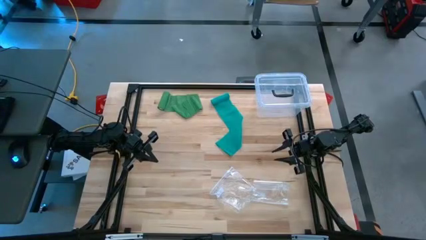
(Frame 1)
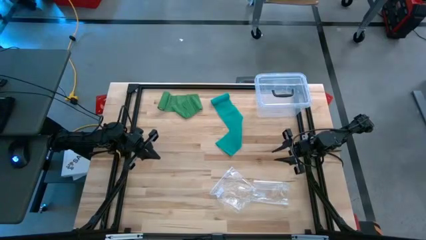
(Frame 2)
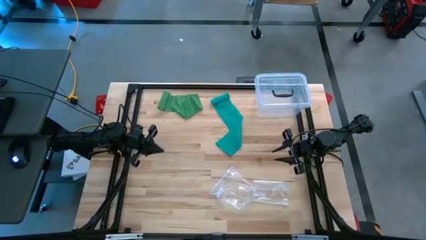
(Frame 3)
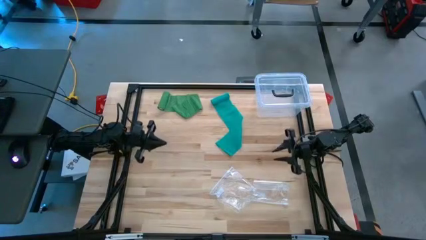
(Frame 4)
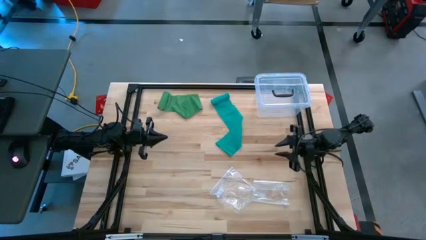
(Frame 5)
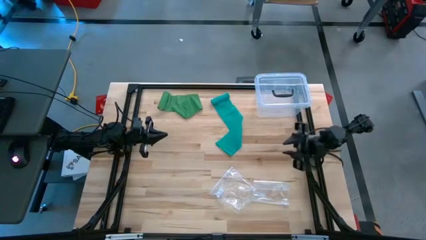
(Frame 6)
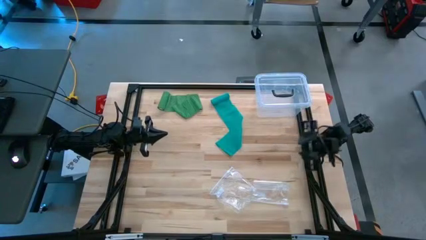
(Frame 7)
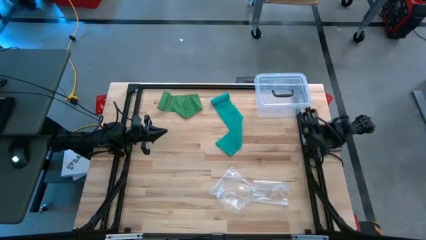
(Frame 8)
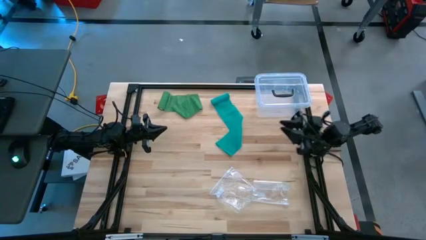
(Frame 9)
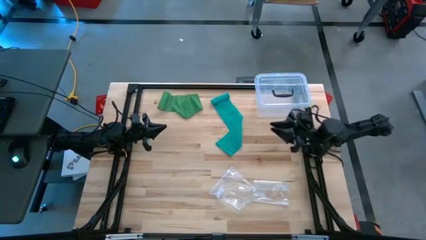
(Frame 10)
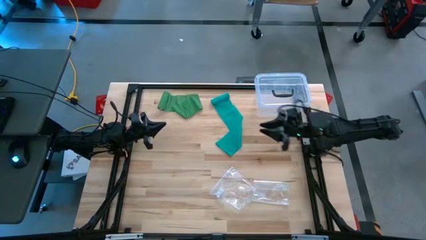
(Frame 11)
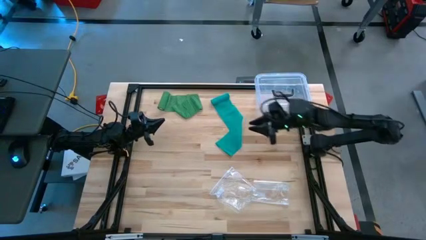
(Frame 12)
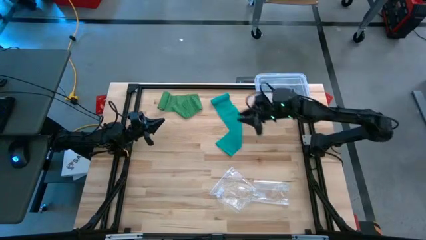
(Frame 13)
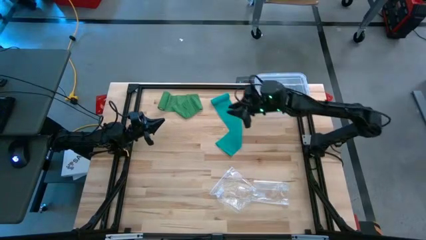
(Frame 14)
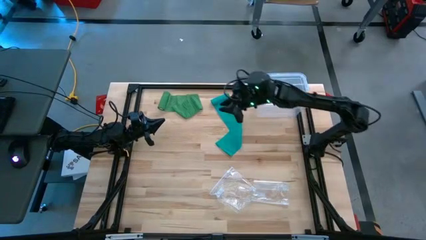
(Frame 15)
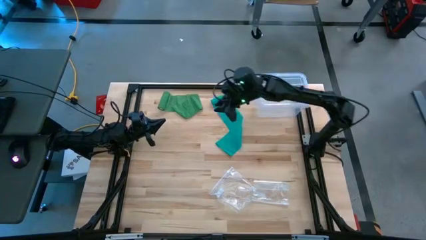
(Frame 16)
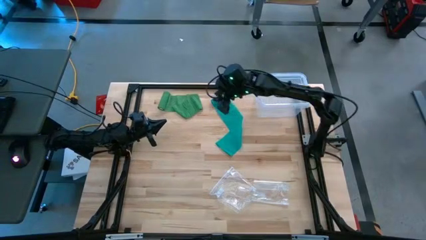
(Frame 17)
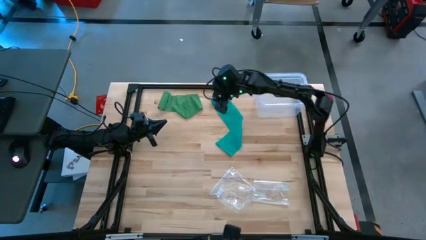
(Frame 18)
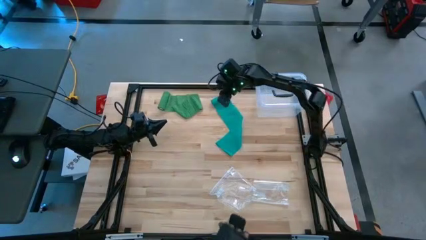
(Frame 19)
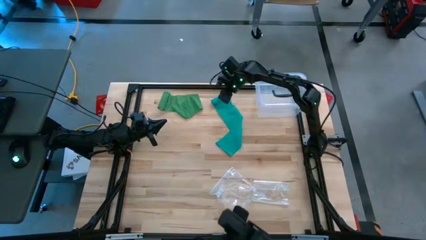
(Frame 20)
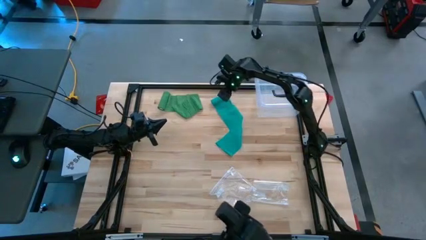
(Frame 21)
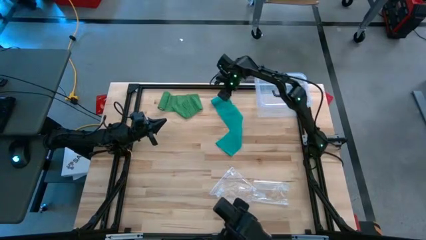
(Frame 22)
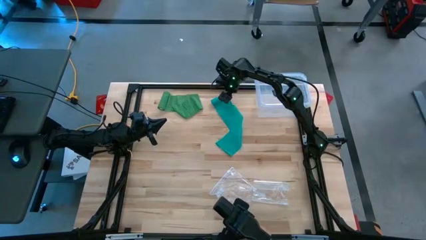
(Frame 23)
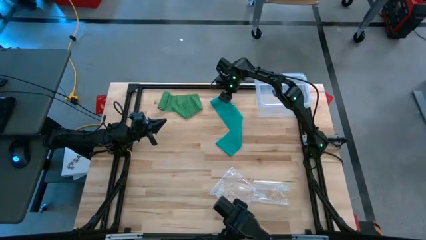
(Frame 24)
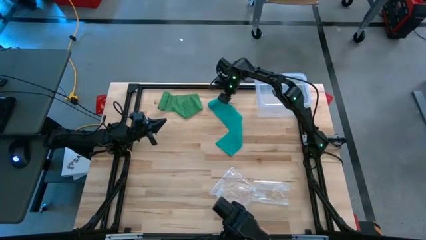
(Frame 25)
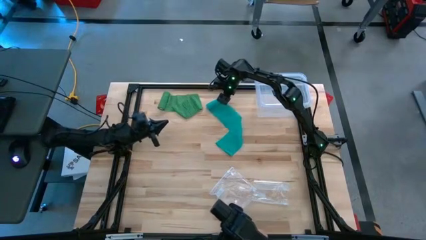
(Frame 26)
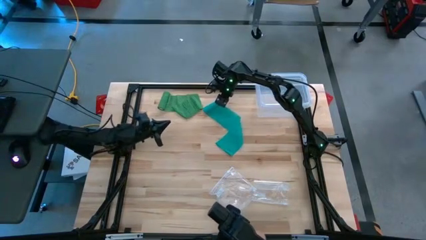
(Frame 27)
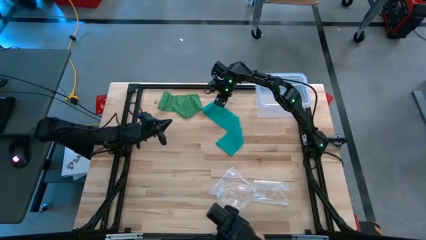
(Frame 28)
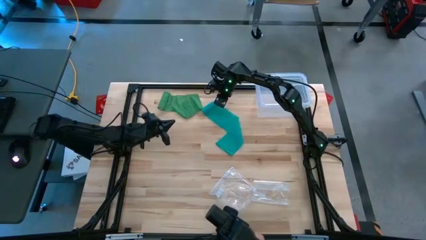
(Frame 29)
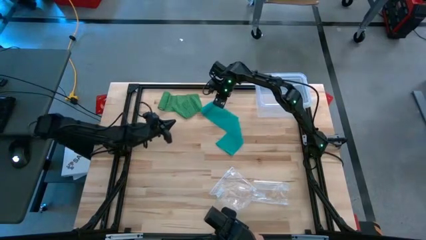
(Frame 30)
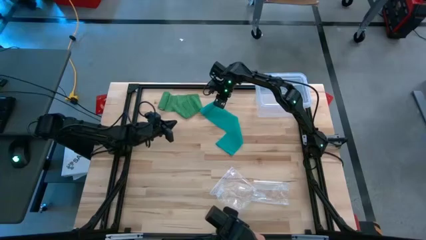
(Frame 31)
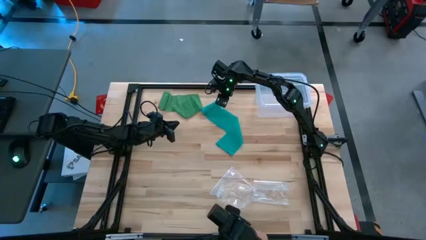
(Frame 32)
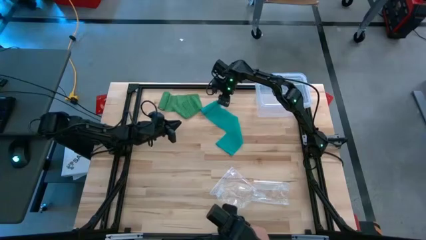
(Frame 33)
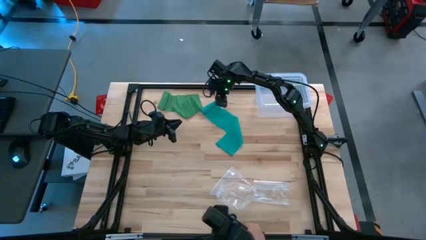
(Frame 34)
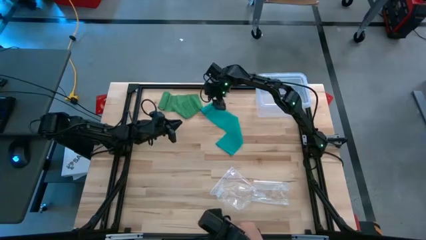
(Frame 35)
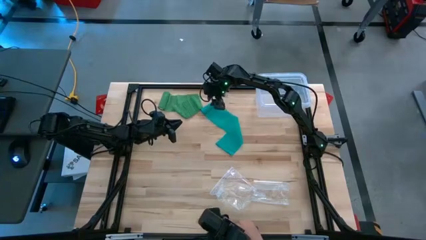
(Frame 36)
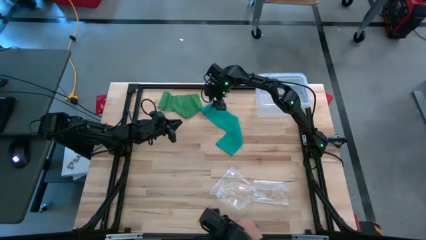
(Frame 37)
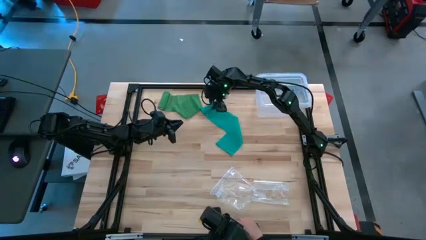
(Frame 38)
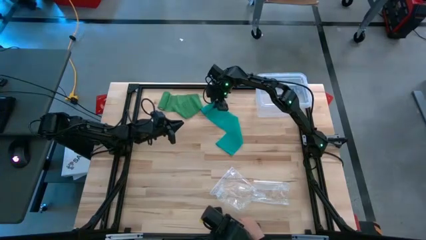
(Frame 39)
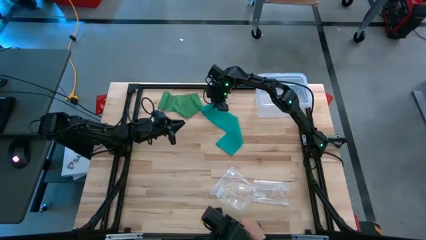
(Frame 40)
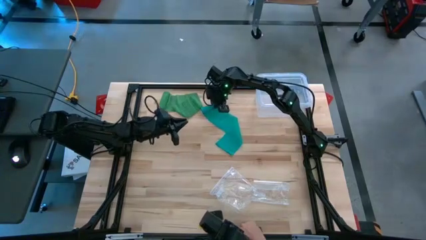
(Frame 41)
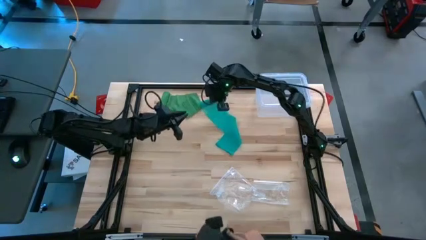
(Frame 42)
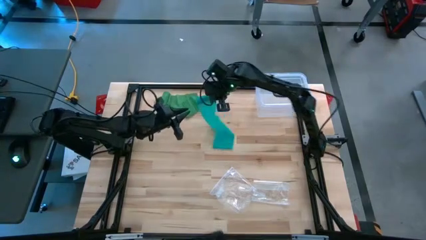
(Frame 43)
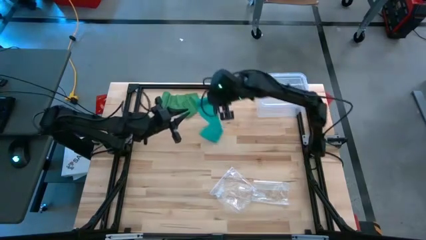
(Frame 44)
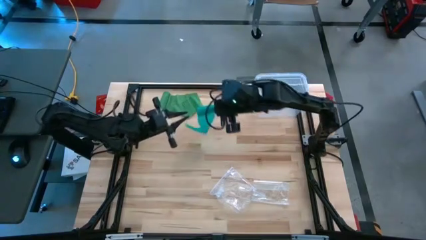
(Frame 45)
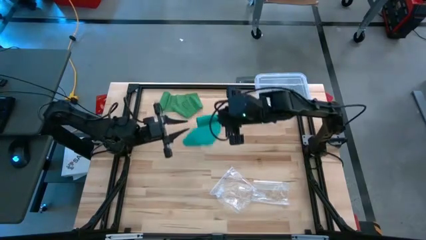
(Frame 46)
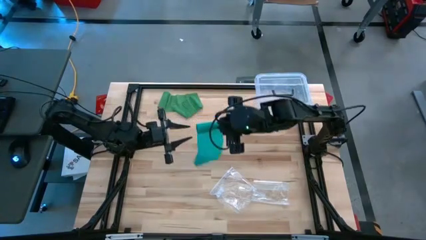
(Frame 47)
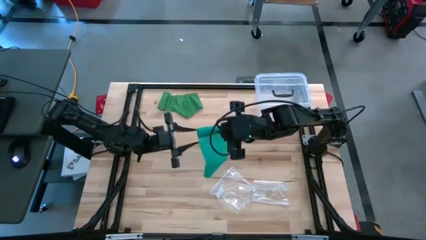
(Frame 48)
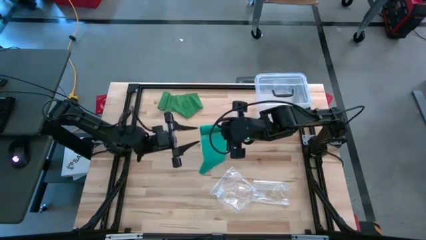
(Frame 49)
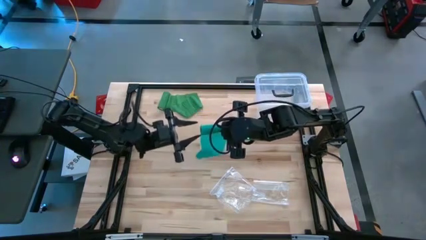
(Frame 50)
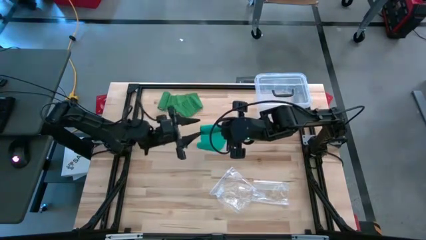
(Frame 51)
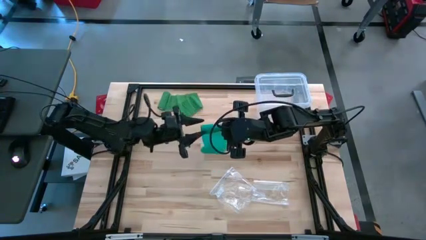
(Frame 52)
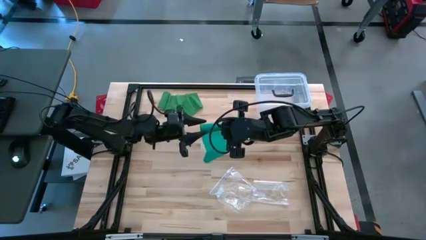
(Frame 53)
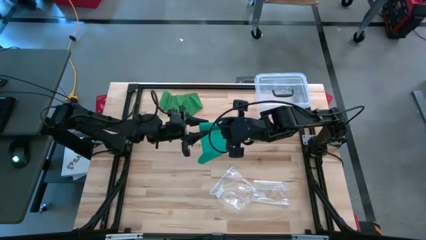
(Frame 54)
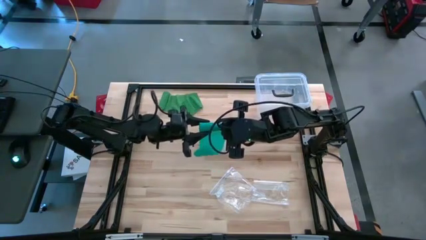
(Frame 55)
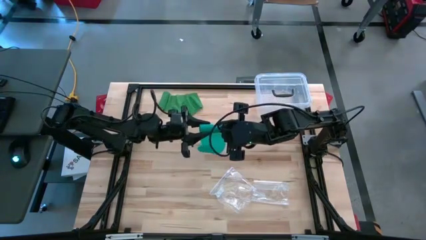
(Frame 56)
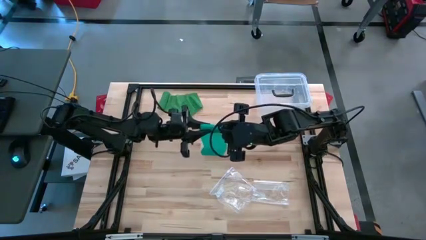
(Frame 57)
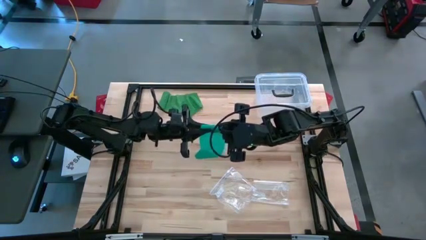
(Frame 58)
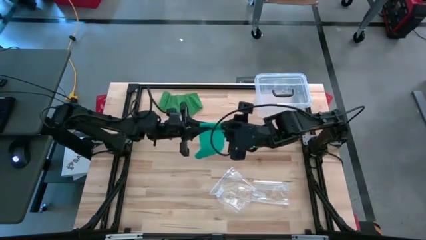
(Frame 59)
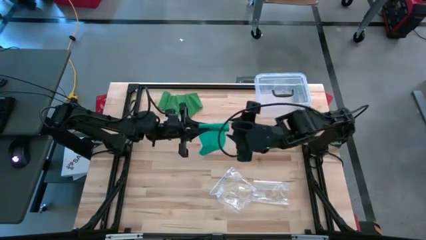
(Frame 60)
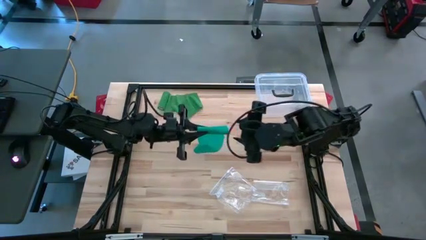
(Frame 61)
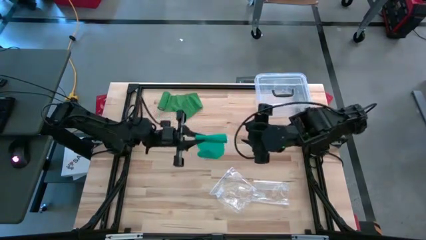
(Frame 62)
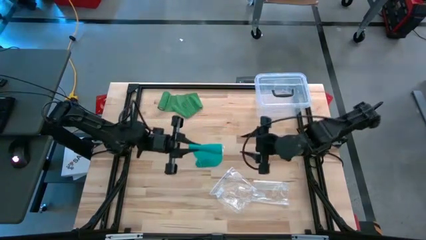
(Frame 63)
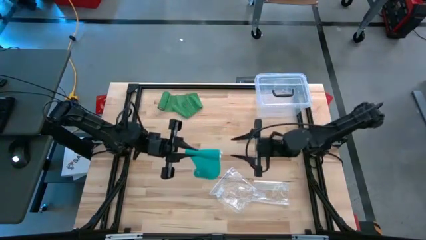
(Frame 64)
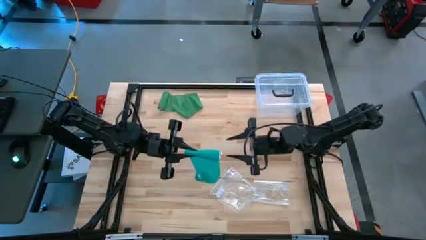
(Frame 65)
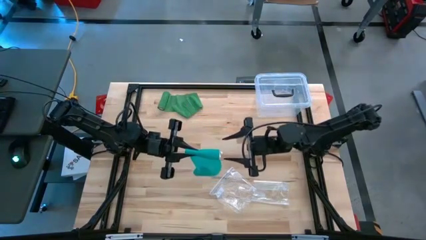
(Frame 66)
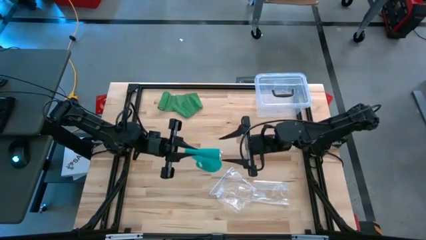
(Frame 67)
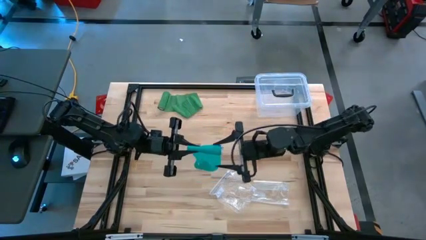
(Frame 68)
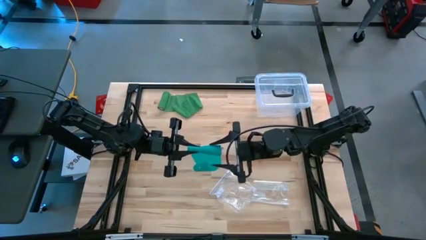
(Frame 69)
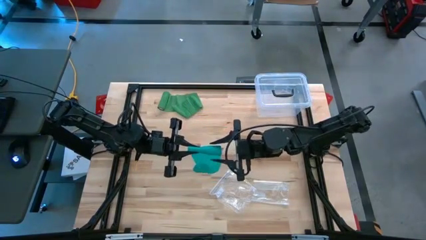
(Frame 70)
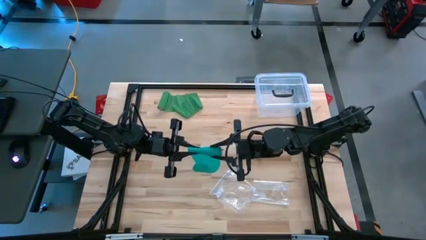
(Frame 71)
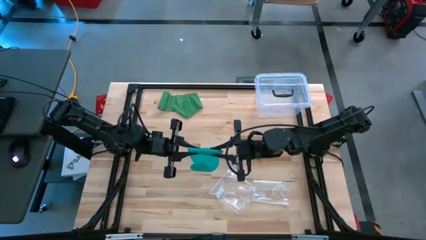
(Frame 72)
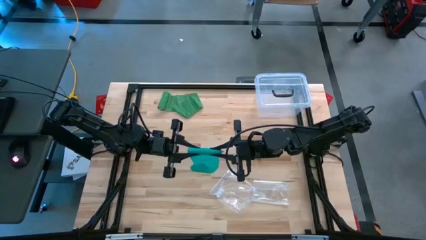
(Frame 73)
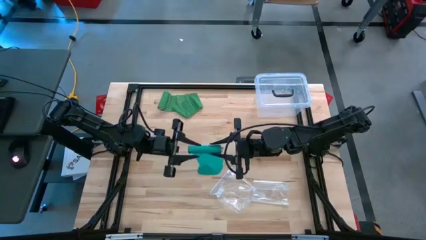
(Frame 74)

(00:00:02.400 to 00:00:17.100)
Task: Roll bandage
Roll the blue bandage
